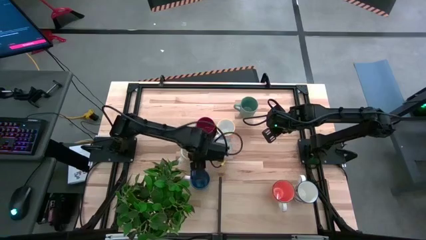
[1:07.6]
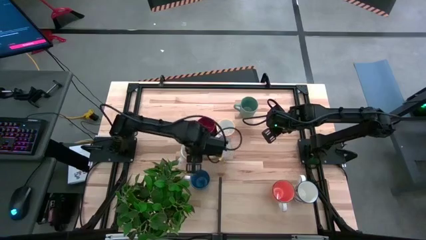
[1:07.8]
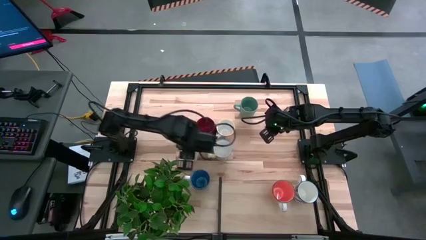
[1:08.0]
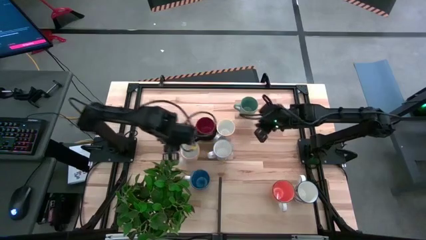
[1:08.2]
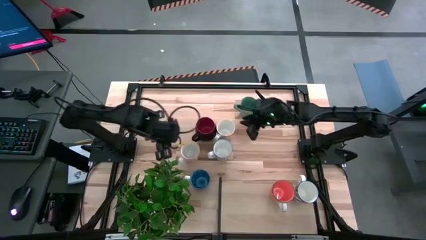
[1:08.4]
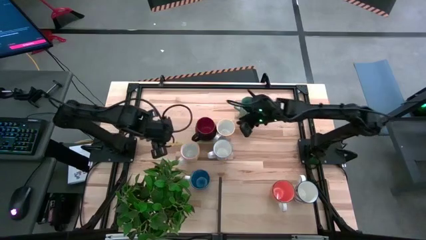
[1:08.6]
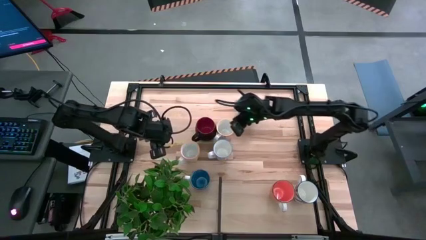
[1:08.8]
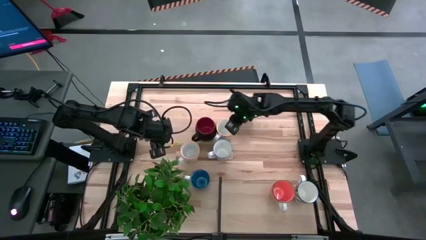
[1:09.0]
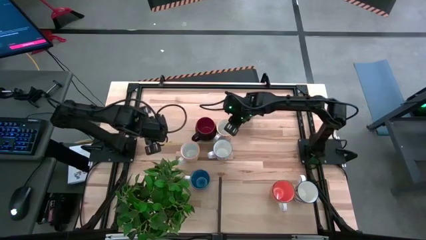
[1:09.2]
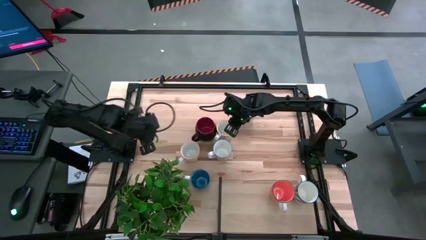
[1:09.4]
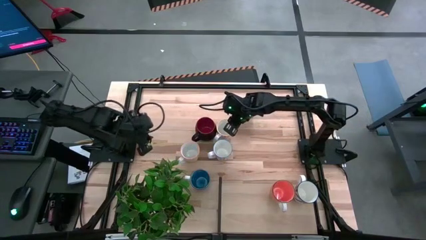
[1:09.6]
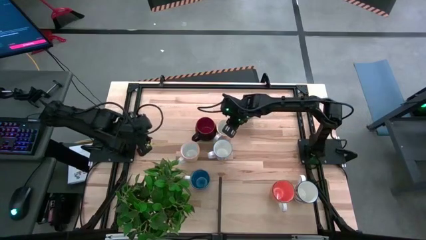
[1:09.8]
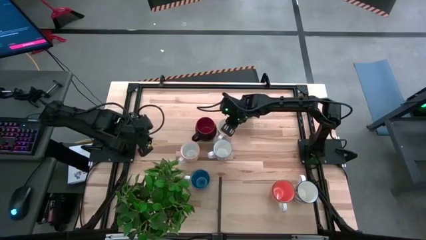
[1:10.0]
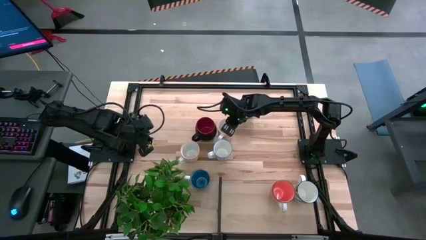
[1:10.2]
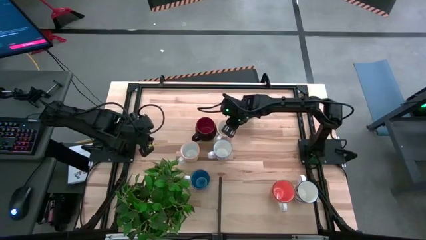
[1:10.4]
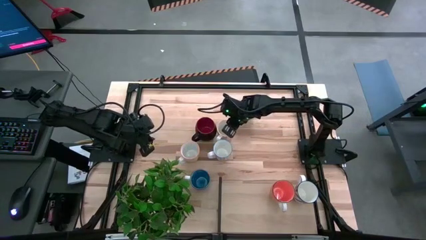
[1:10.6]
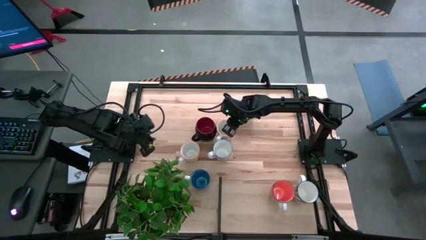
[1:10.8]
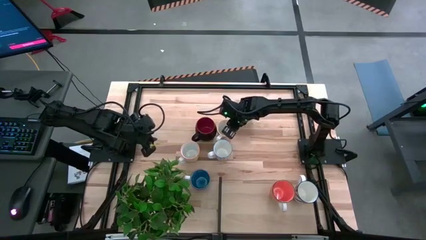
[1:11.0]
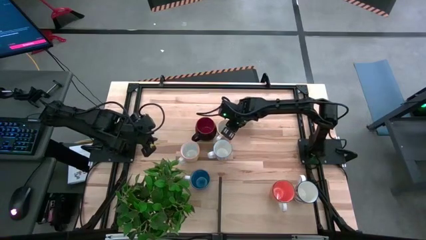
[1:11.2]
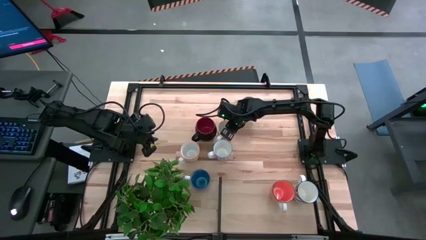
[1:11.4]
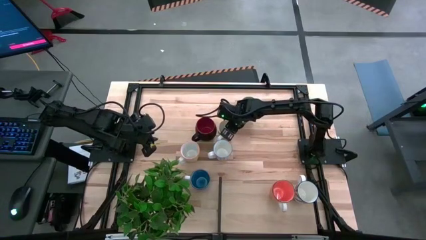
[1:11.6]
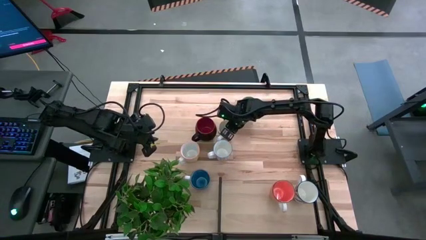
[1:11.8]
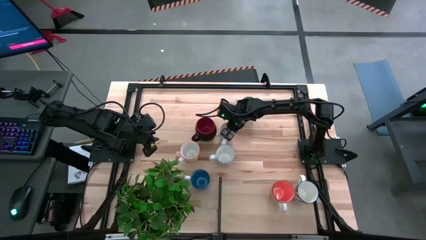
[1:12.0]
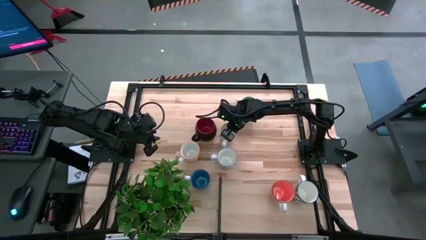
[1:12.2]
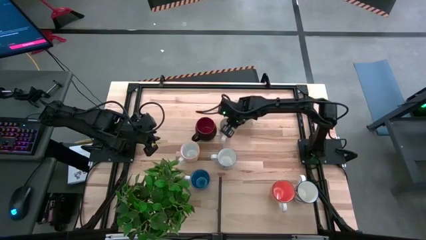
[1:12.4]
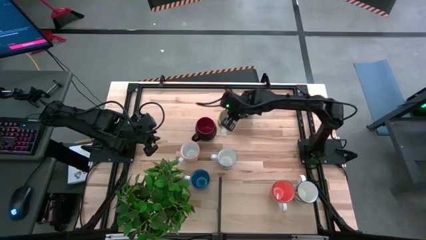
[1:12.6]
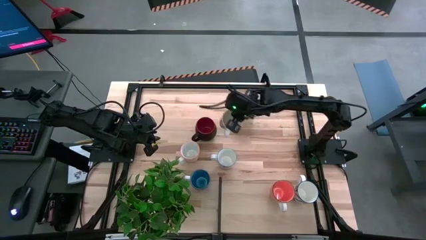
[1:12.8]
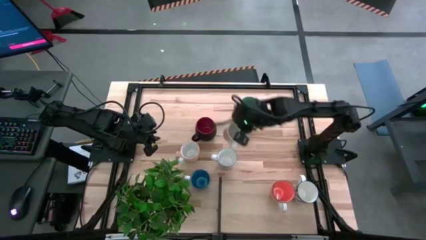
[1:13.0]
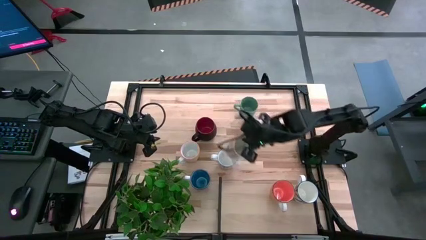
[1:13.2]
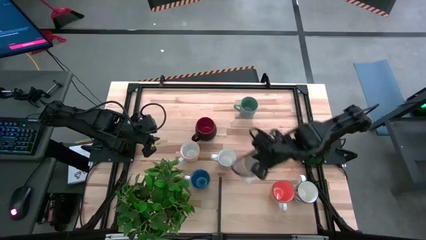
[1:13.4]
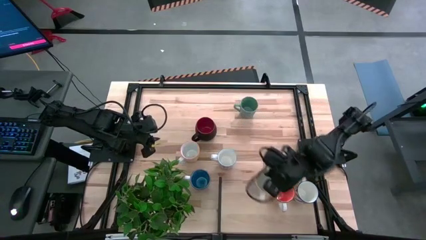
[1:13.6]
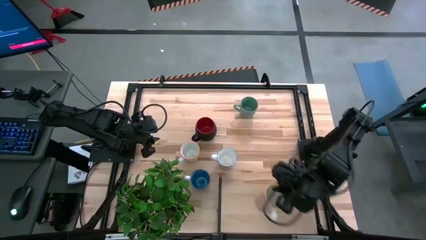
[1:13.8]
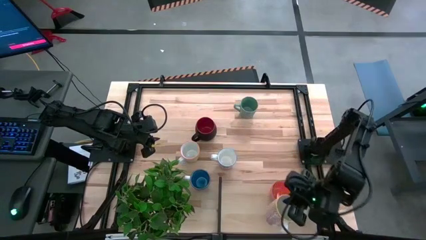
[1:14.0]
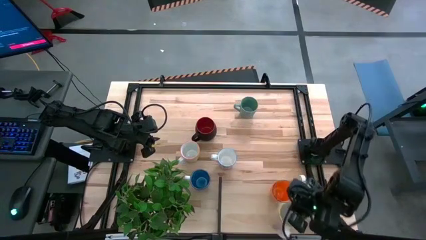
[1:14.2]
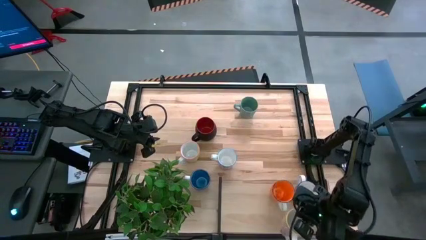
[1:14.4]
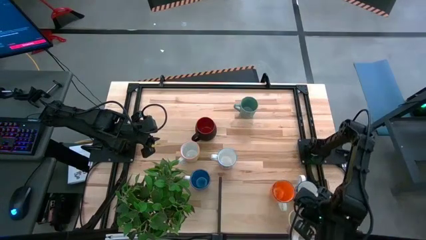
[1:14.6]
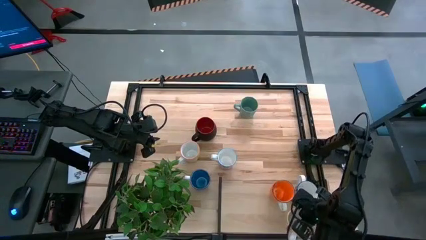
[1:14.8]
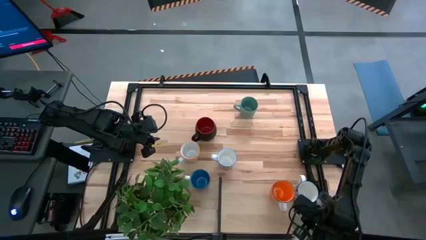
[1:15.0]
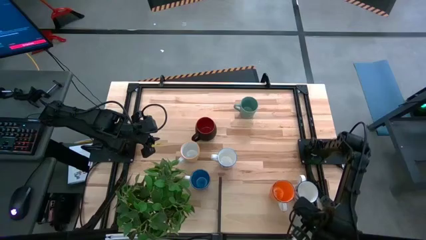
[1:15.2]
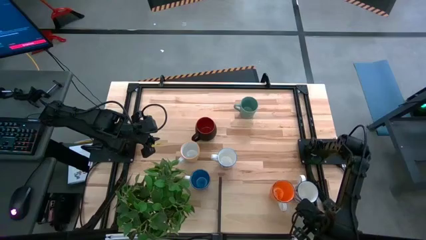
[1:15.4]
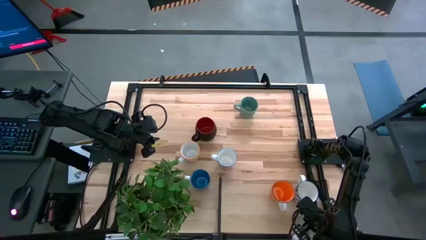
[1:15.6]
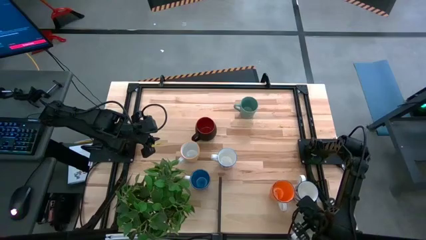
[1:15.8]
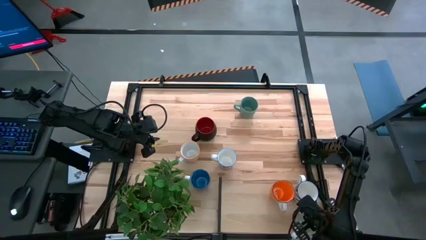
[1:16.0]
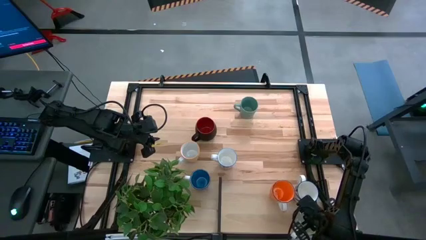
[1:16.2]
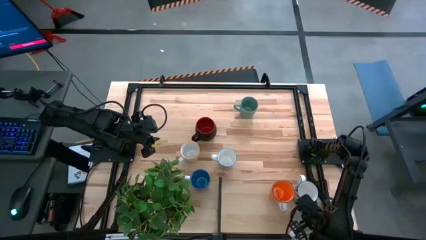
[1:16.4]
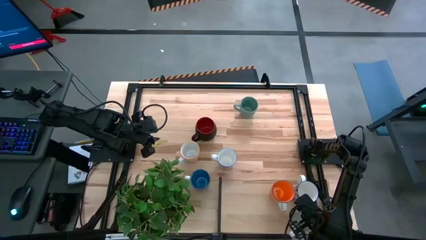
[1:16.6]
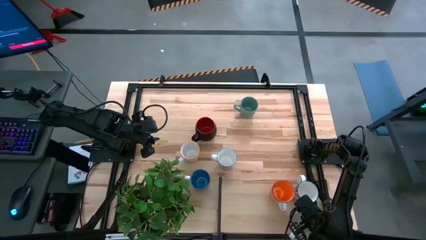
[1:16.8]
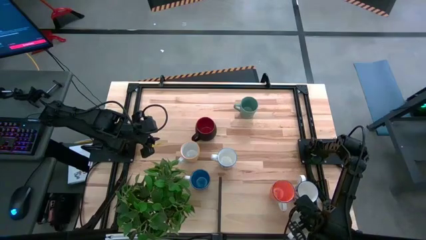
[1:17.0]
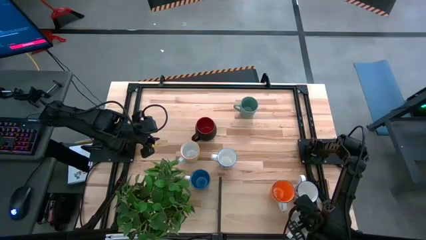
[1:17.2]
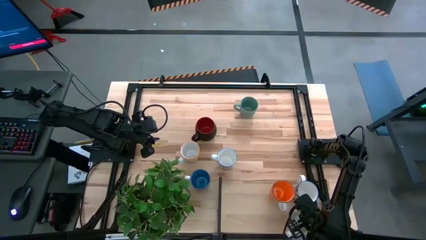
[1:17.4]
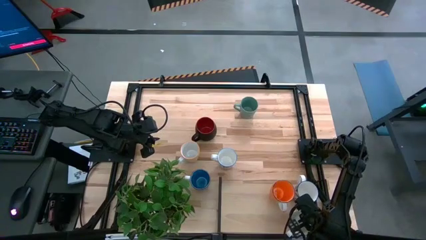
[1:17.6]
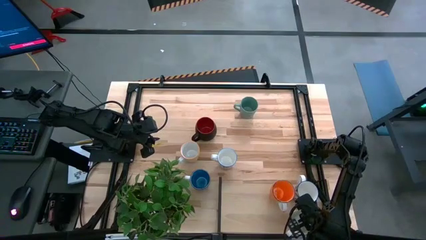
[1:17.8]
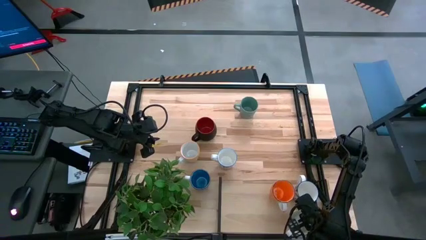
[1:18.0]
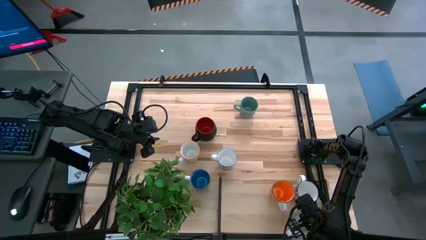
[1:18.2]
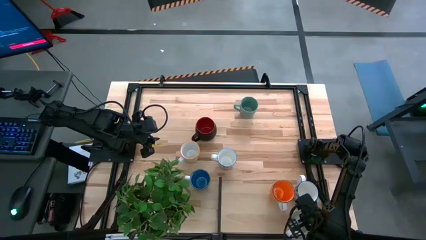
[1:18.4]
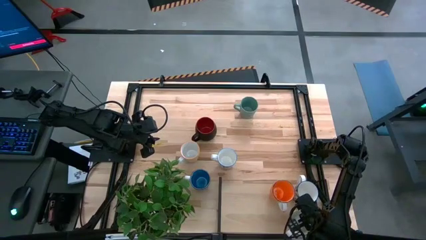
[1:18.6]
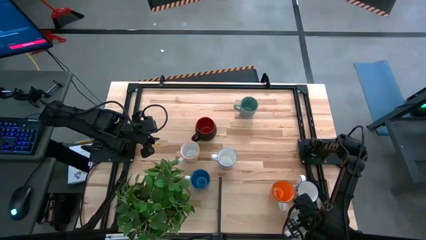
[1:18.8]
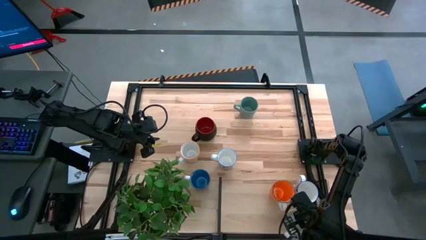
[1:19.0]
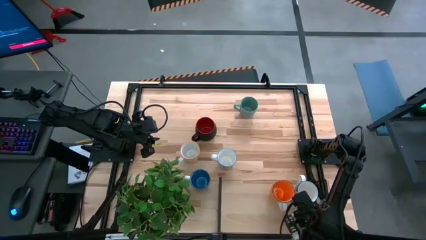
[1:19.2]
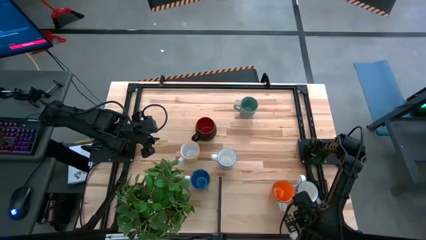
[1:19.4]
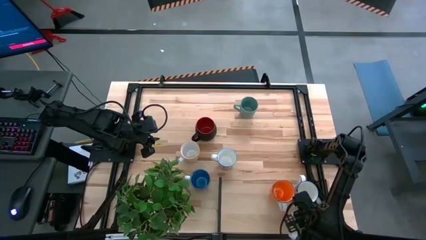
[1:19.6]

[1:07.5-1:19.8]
Task: Place coffee mugs
Put the orange patterned mug on the shelf

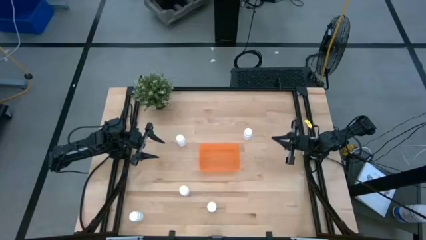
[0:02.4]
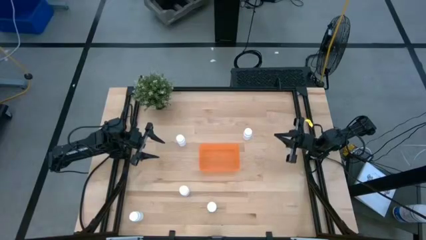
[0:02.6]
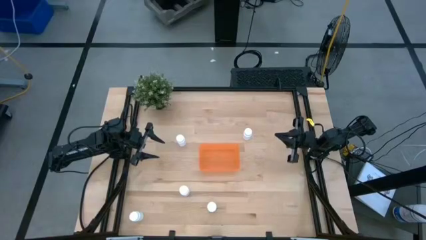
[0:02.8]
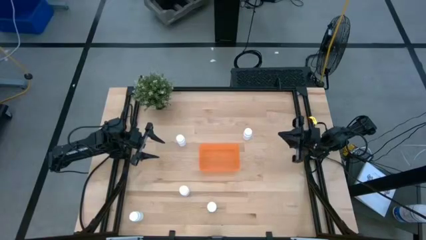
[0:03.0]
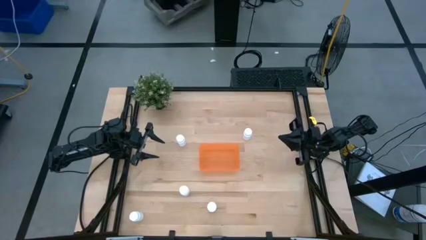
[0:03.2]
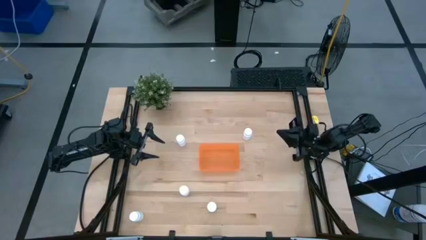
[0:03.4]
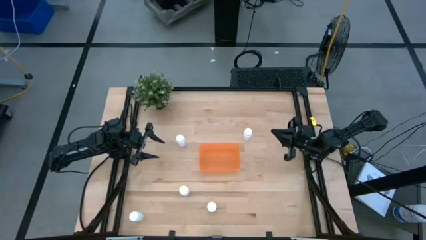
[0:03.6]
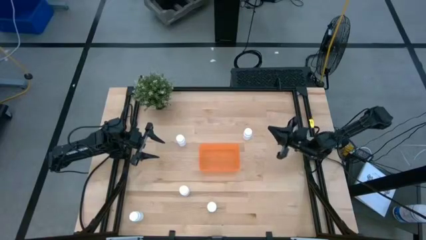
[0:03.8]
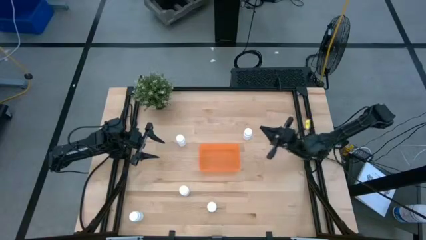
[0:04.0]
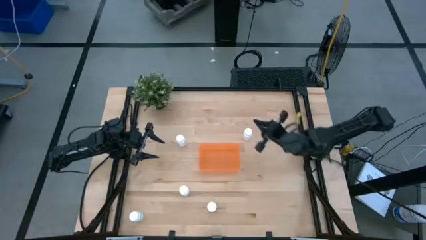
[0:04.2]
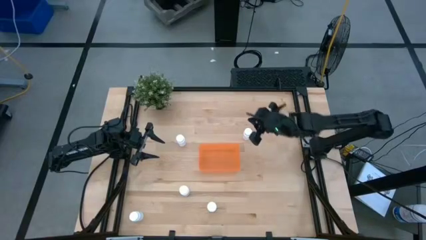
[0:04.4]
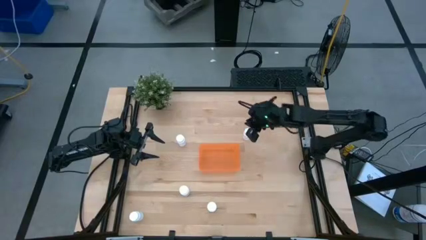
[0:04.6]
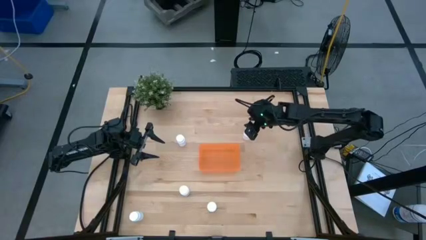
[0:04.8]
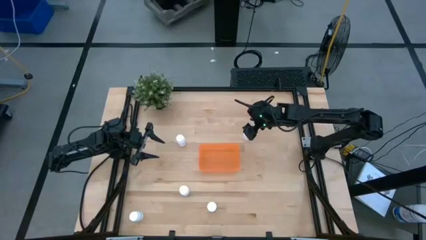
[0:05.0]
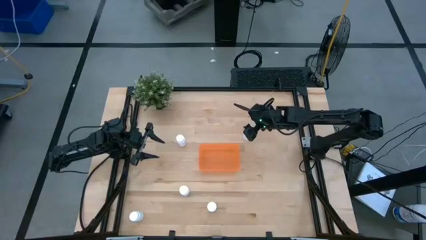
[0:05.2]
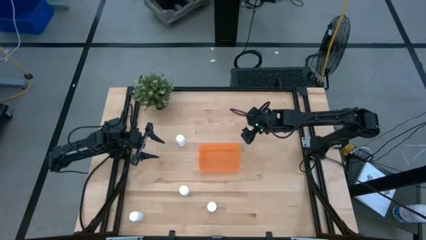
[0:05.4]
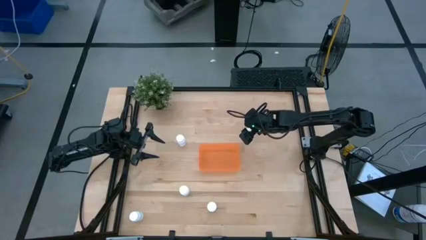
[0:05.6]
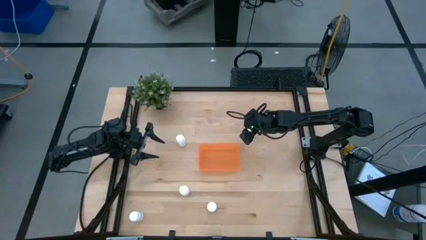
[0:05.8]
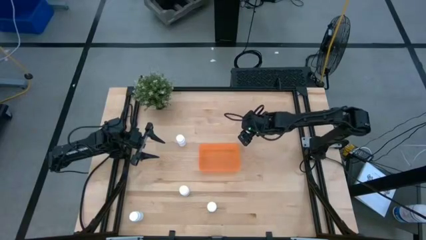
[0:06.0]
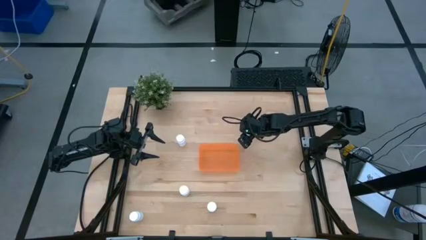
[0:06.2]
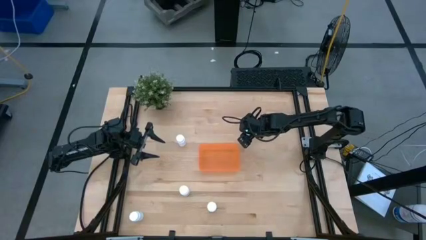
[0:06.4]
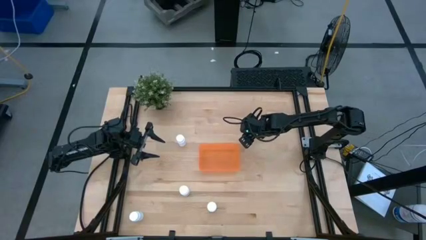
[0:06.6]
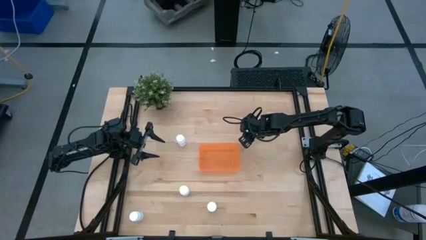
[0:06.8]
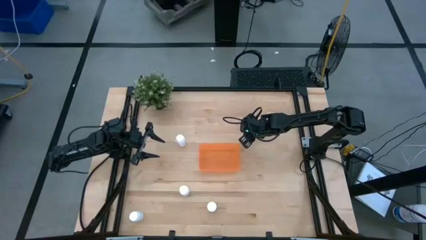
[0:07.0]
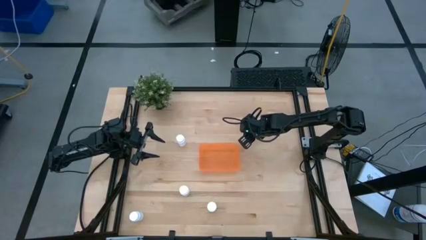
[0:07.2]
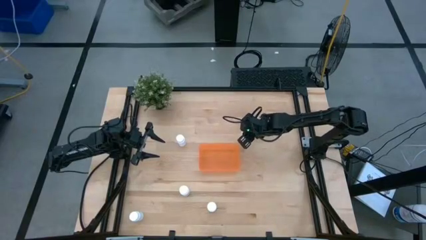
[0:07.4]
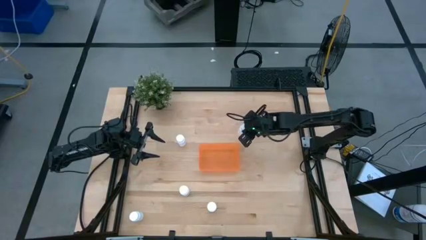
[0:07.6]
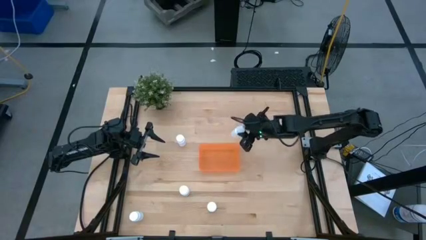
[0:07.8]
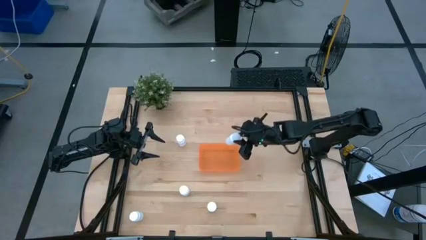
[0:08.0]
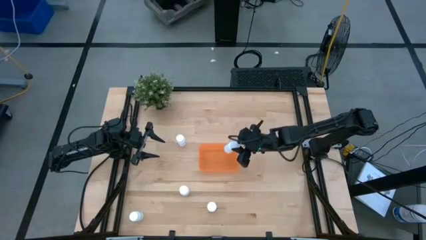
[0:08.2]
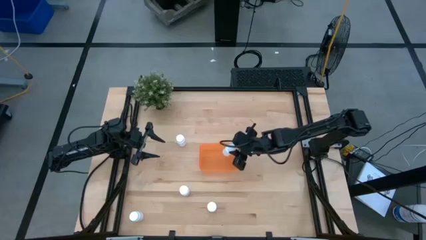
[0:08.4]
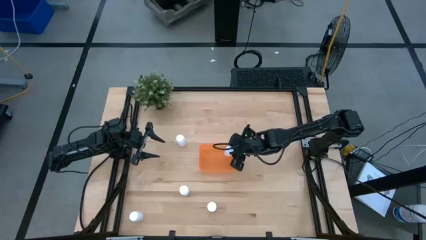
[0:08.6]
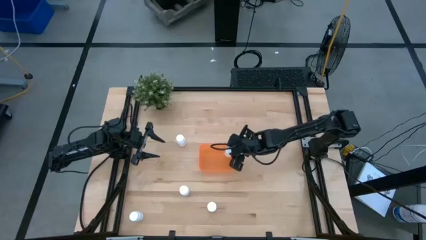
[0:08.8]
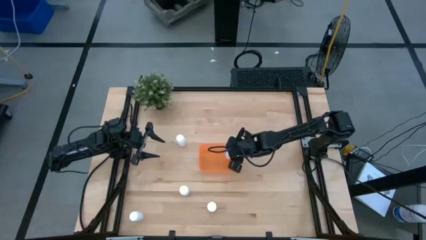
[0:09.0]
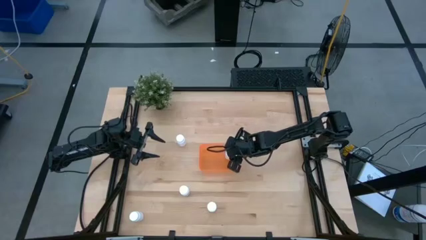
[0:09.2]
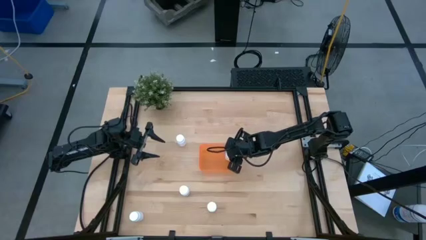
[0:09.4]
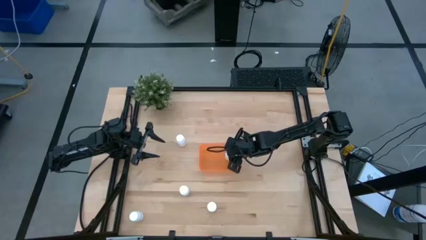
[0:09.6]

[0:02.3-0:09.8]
Task: Pick and place pill bottles into a basket
Put the white medicine bottle into the orange bin
